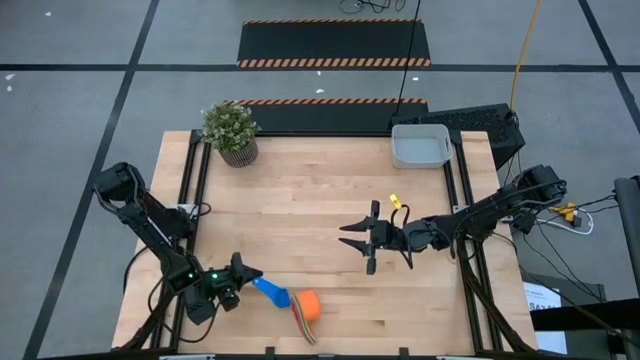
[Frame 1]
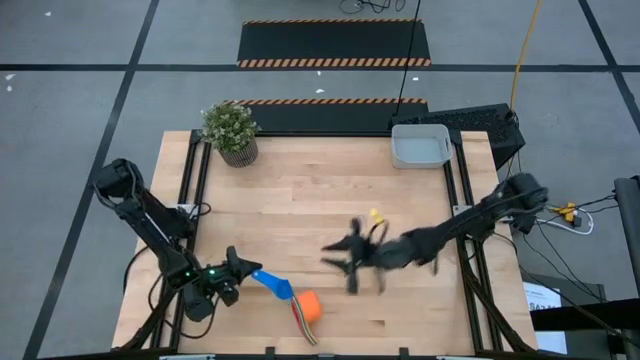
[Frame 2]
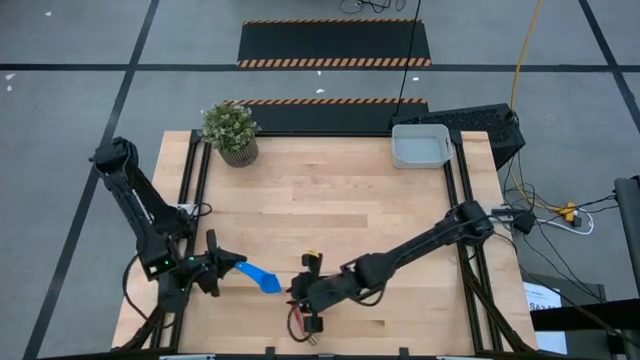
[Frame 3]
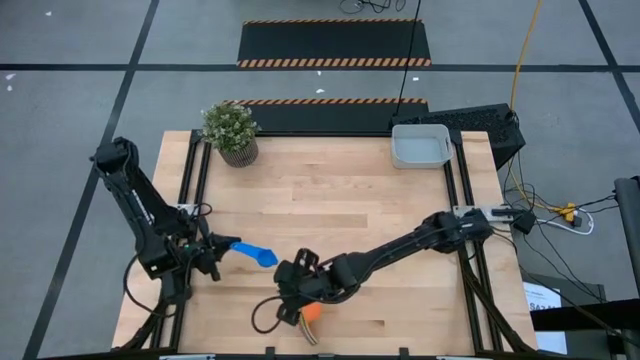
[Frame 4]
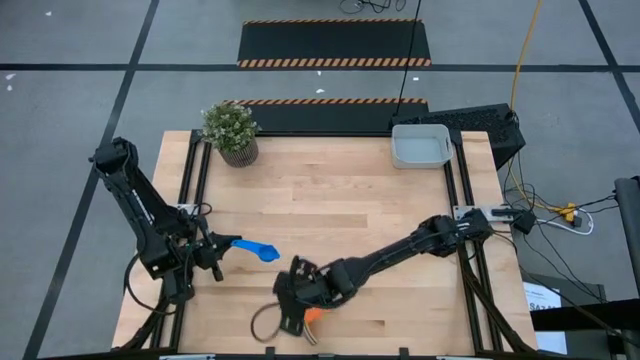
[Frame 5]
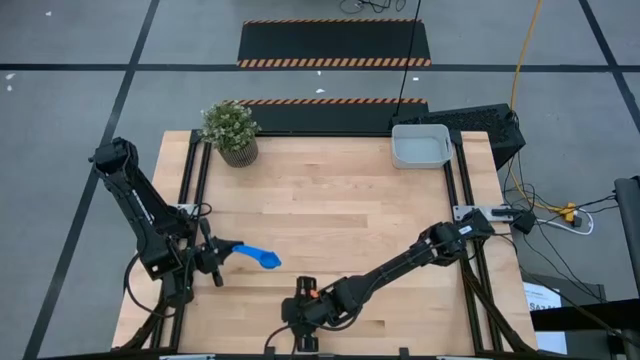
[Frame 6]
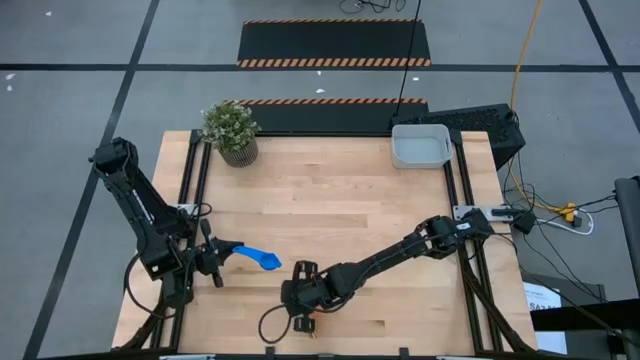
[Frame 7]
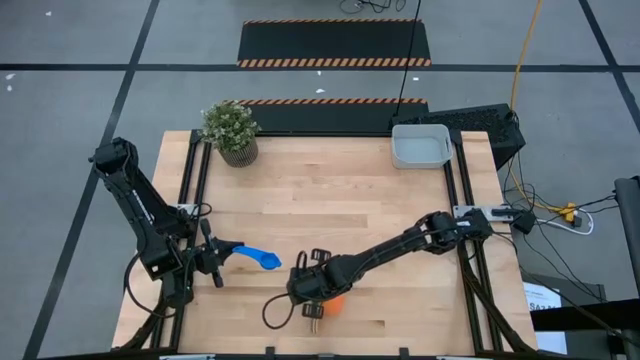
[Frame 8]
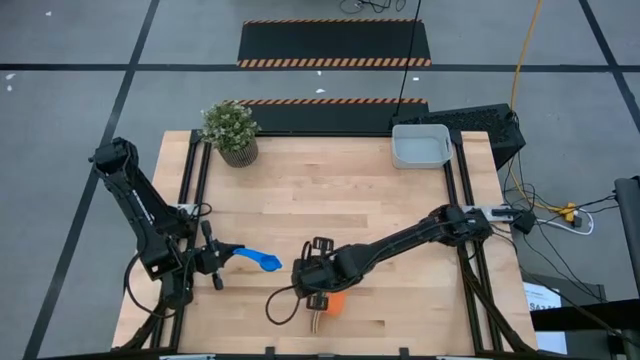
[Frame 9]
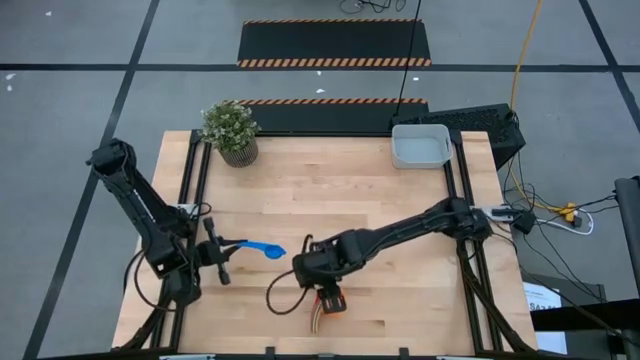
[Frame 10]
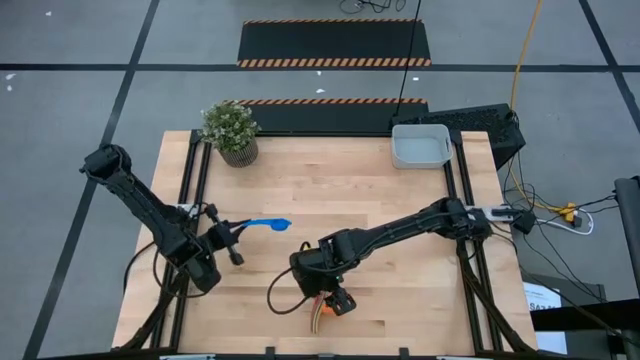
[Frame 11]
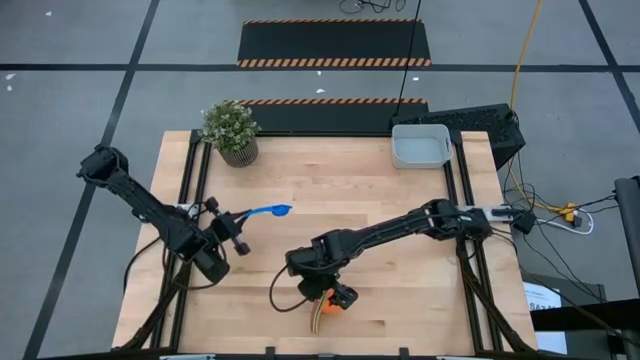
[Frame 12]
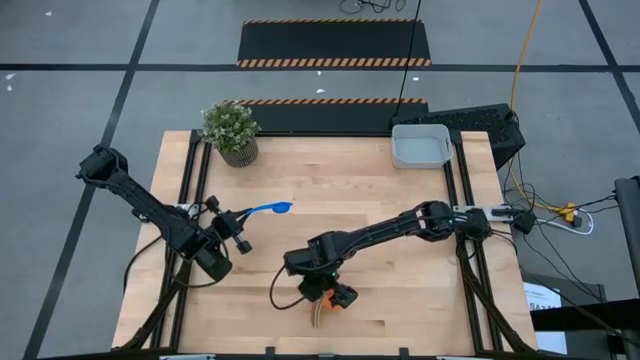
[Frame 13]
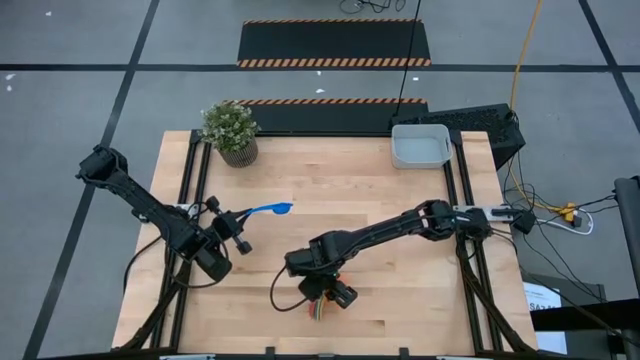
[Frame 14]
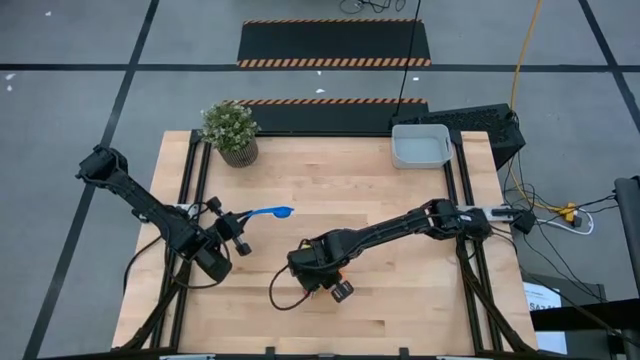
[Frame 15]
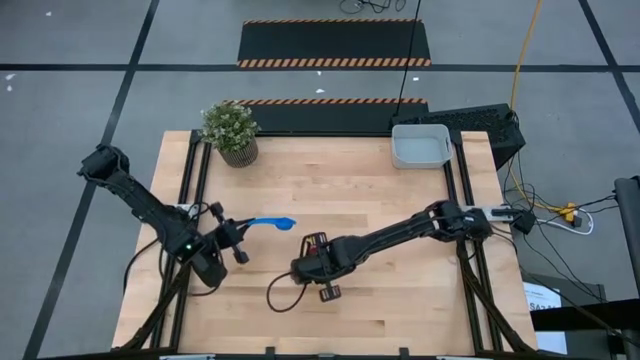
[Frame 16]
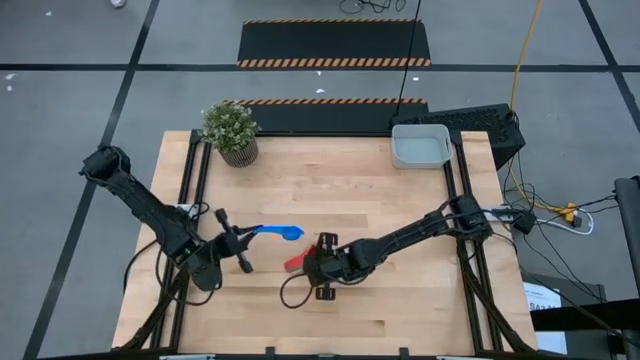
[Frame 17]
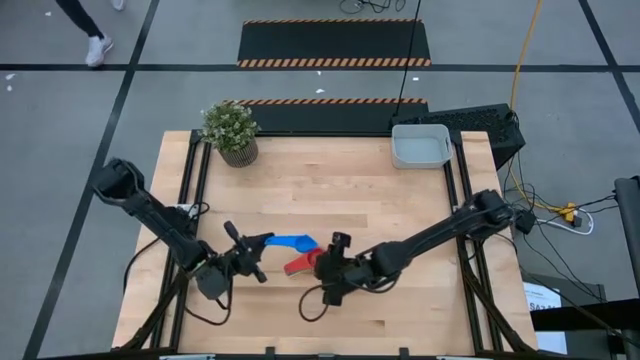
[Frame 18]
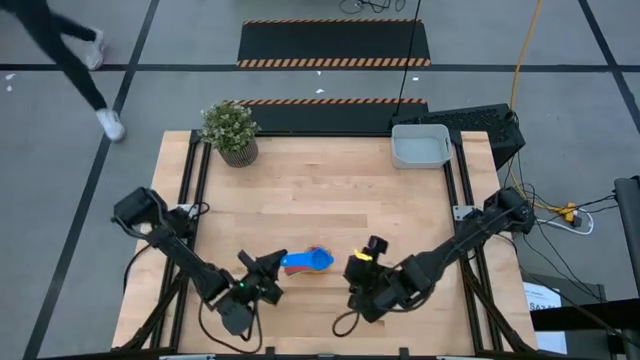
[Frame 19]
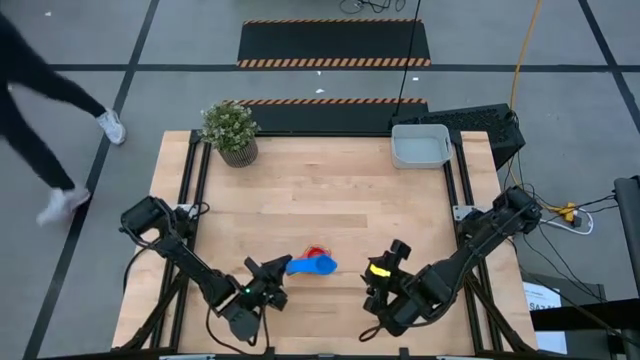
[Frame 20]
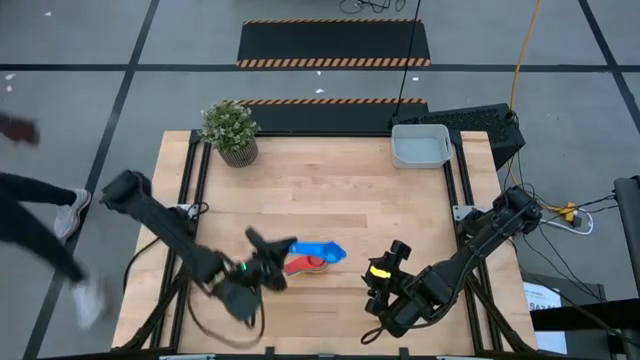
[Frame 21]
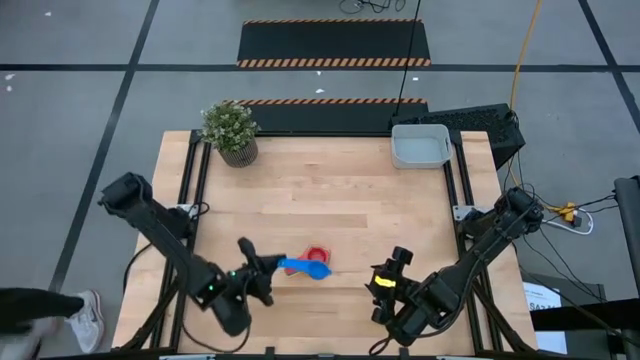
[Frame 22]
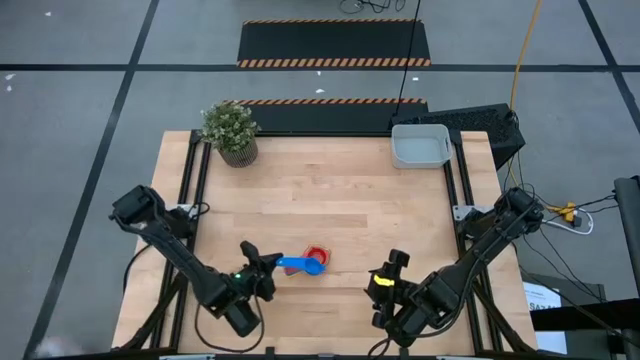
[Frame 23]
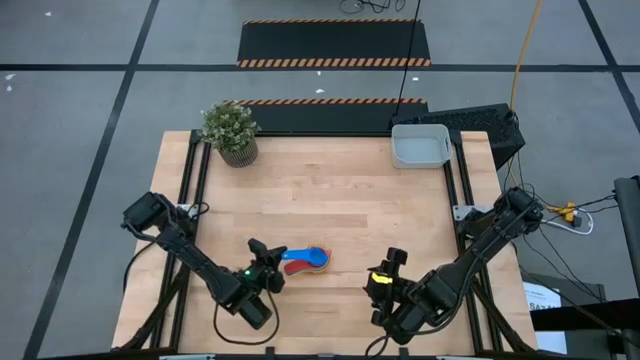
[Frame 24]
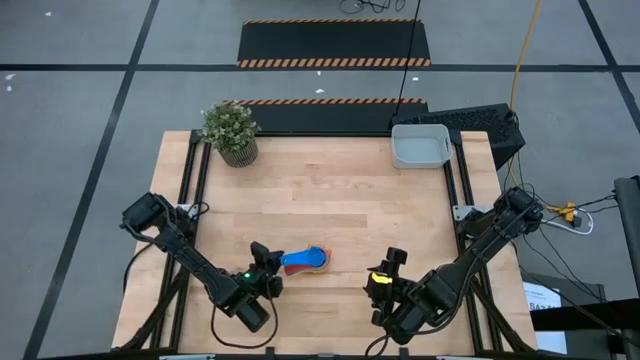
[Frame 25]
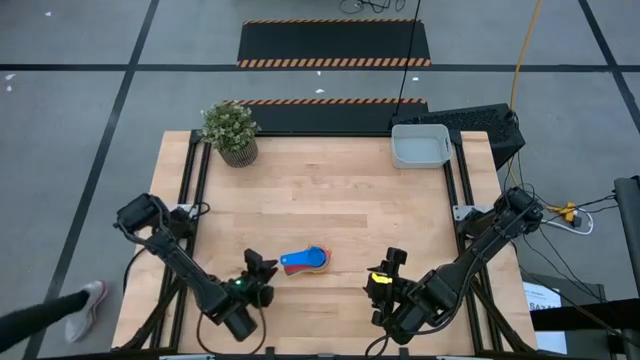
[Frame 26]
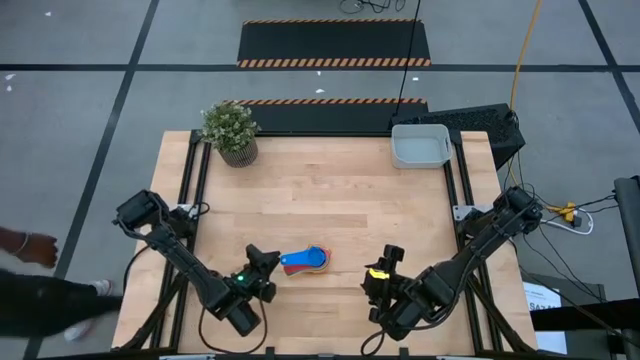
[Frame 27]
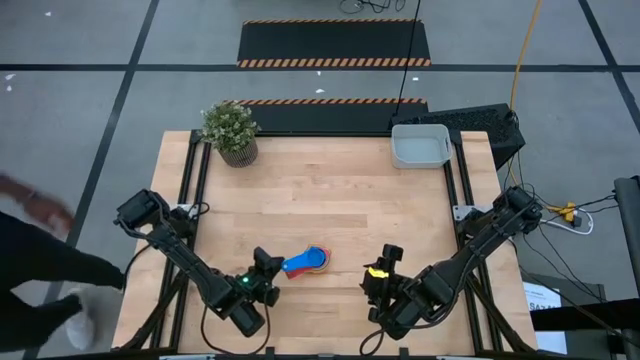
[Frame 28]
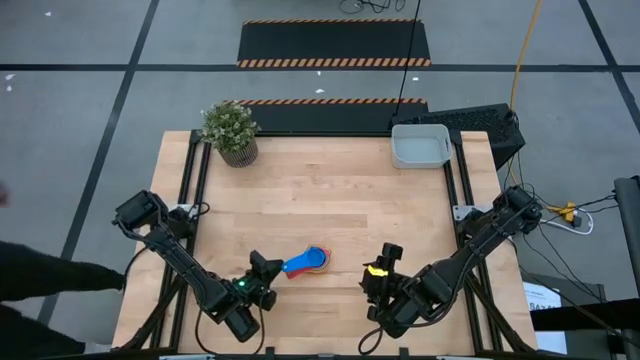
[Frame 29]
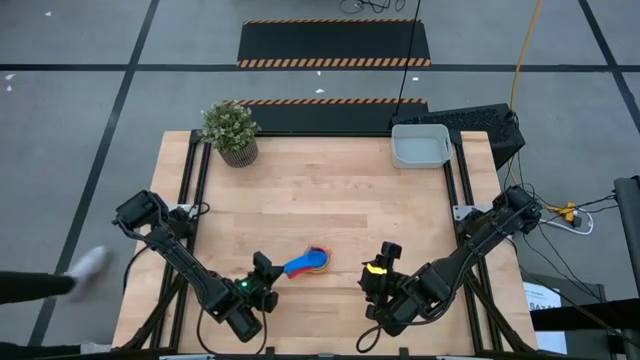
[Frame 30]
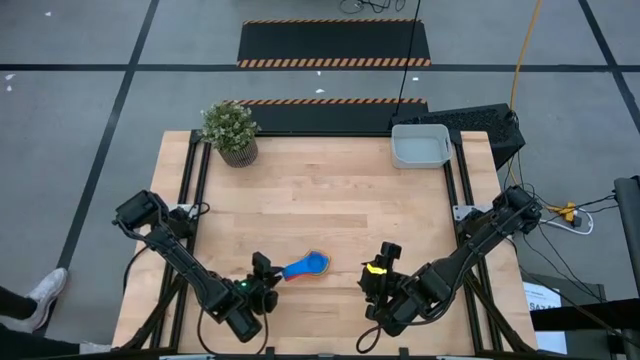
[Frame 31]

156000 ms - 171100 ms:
Task: Nest measuring cups in basket
Stack the light blue measuring cup on the red measuring cup

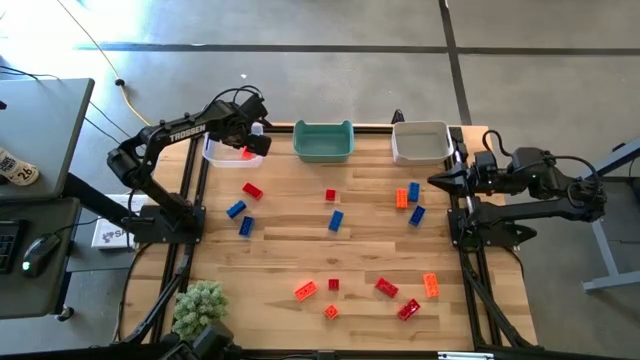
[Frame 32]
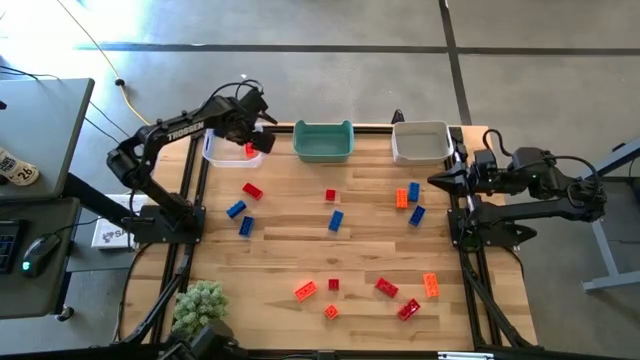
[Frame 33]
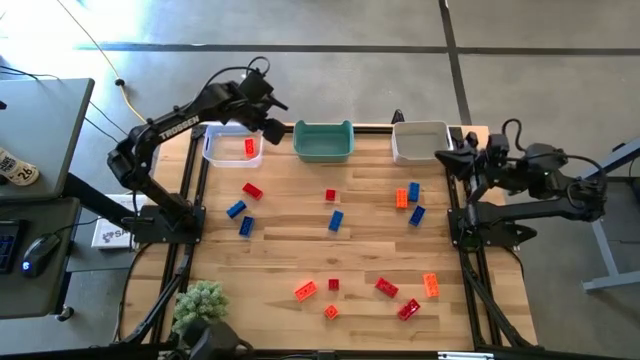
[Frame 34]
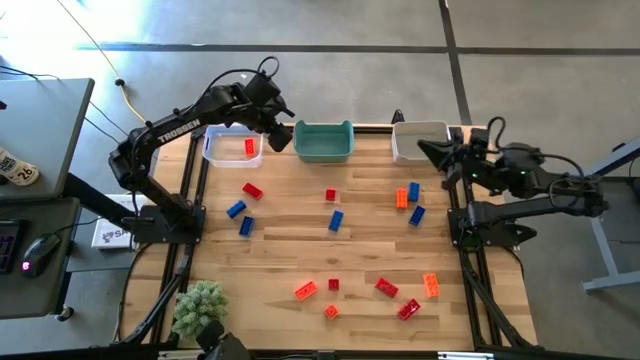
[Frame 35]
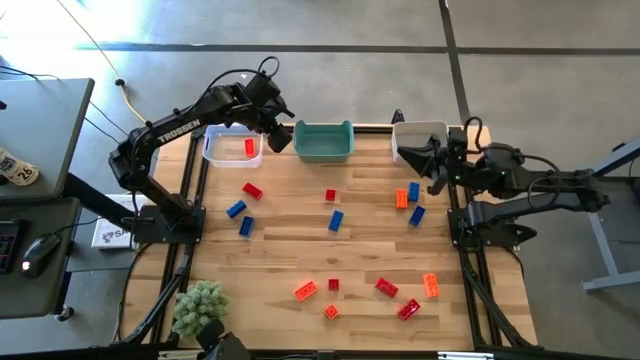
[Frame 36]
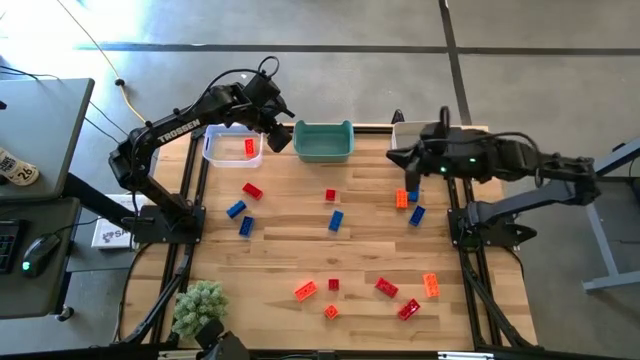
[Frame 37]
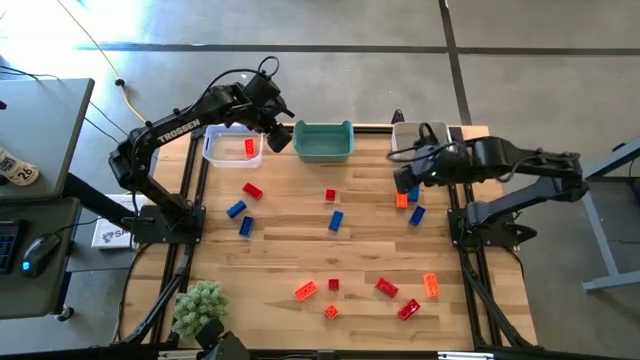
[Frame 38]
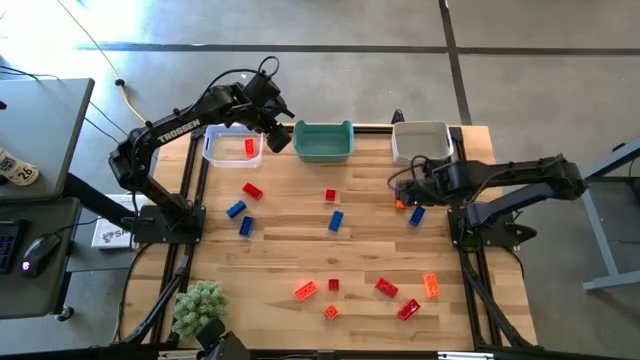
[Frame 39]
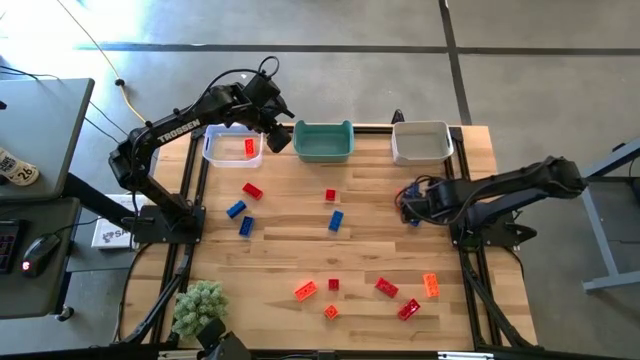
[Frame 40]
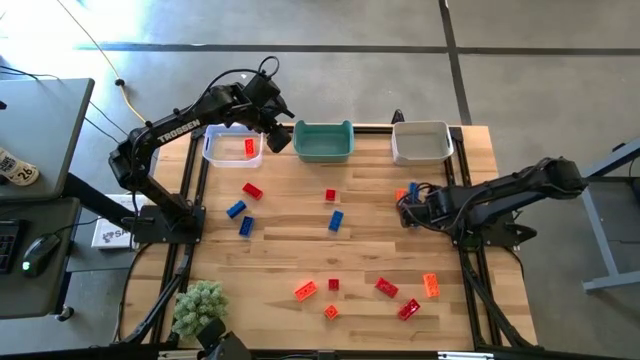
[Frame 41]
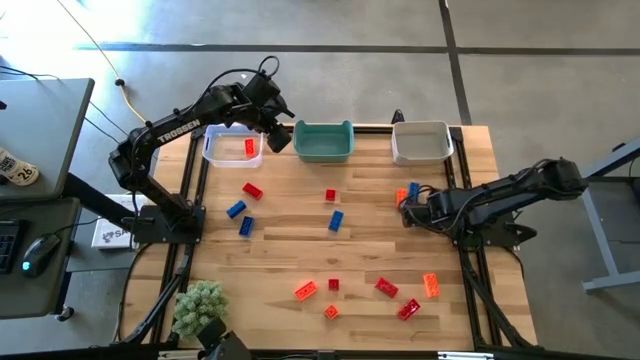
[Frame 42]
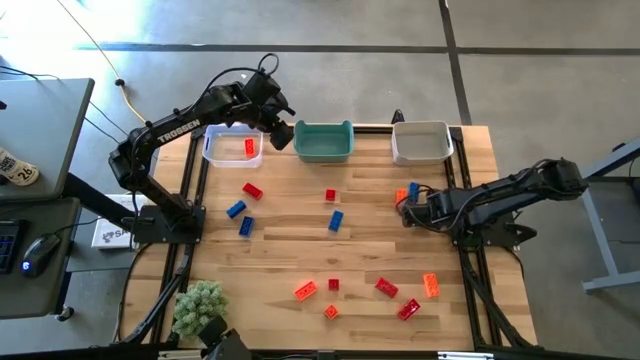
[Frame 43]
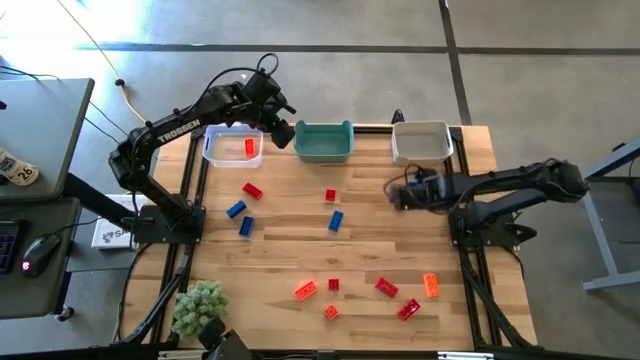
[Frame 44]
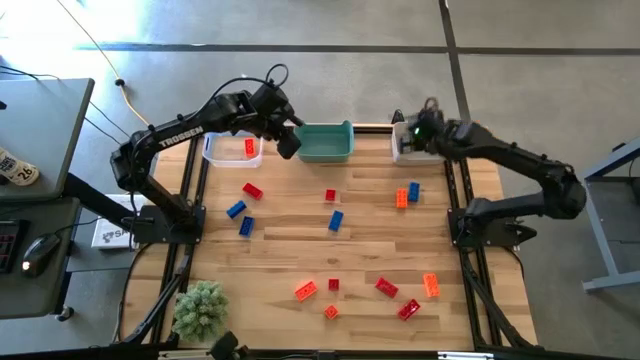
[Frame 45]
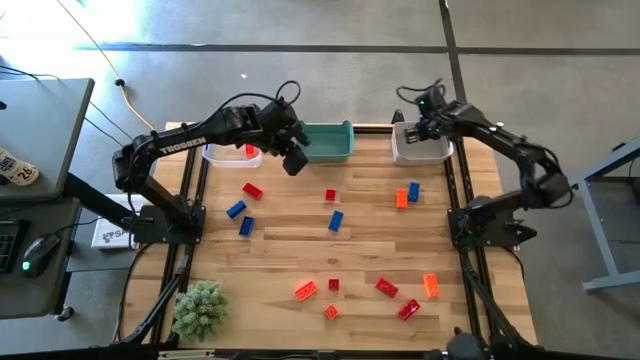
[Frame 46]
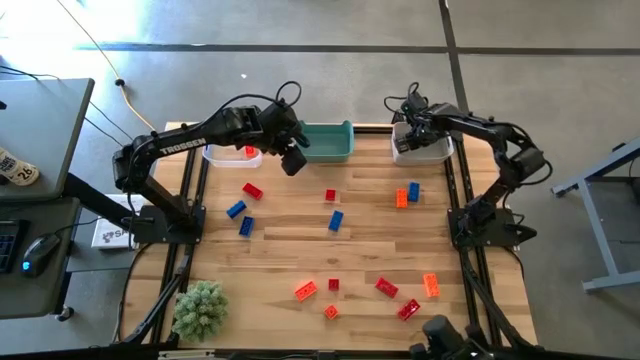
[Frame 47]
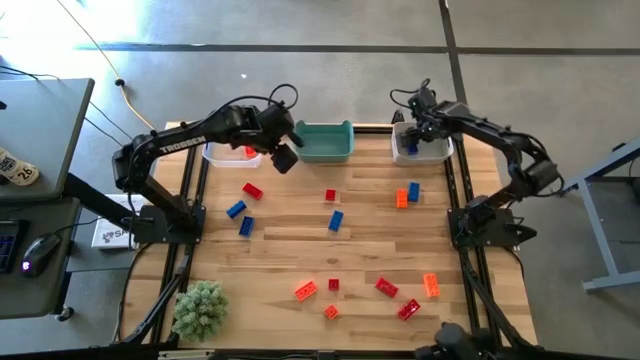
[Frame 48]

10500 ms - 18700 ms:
Task: Sort & place blocks by color
Put the blue game piece into the white bin
